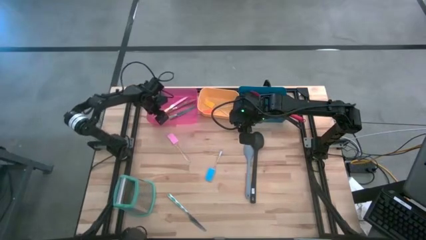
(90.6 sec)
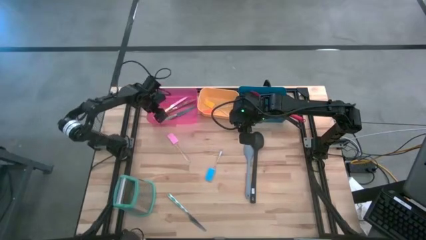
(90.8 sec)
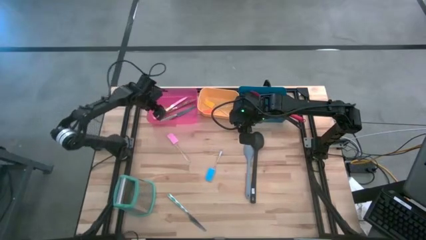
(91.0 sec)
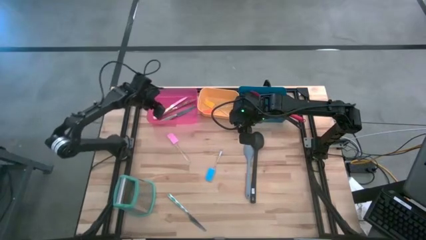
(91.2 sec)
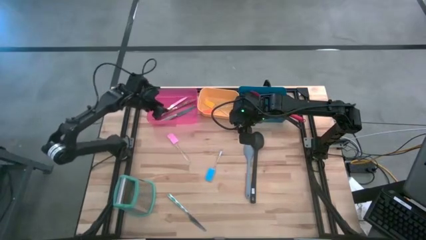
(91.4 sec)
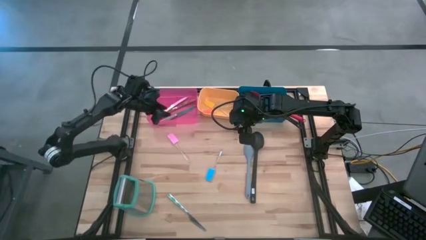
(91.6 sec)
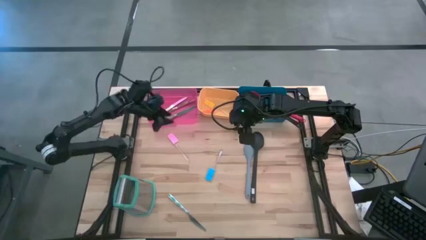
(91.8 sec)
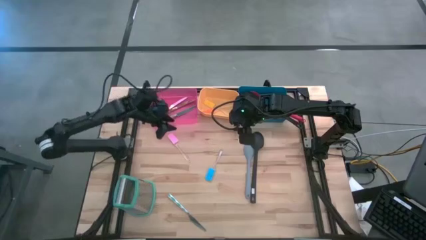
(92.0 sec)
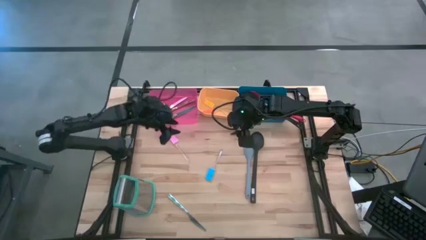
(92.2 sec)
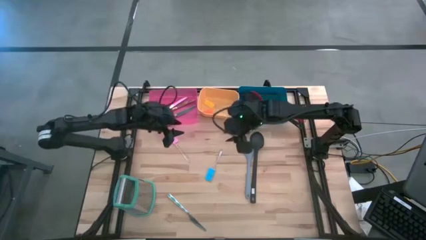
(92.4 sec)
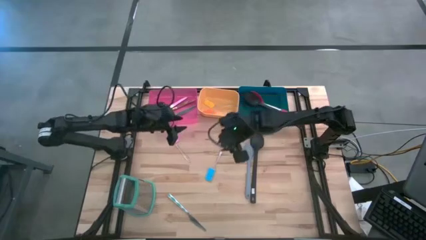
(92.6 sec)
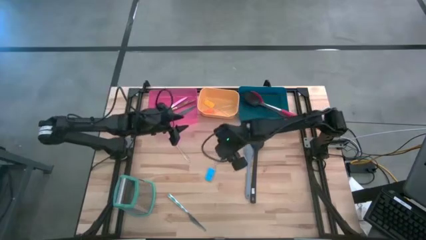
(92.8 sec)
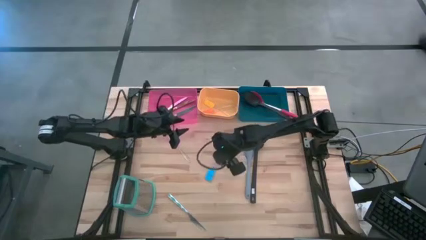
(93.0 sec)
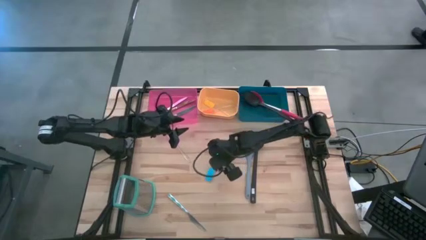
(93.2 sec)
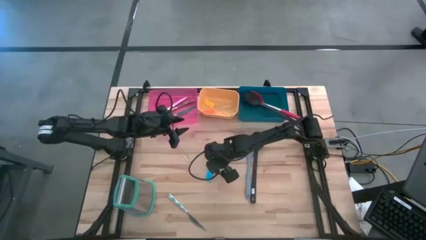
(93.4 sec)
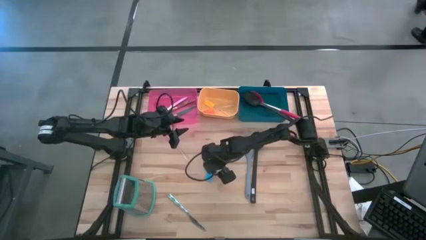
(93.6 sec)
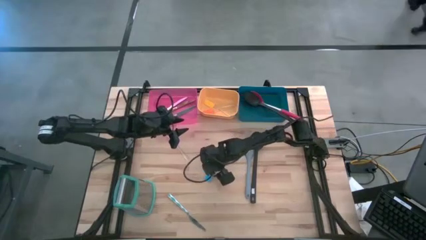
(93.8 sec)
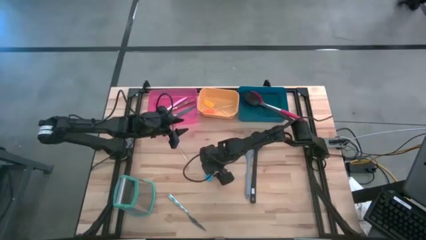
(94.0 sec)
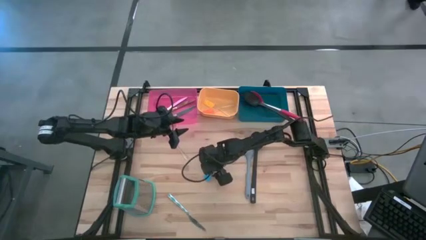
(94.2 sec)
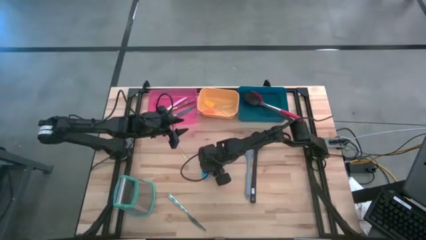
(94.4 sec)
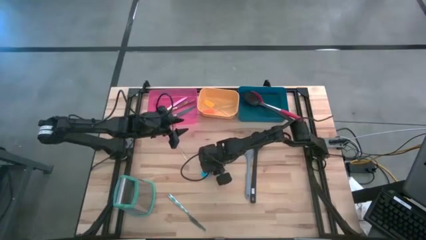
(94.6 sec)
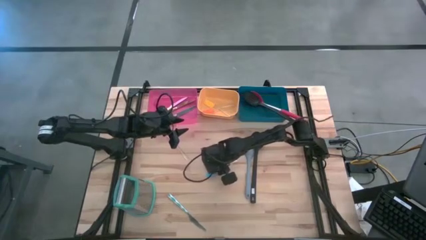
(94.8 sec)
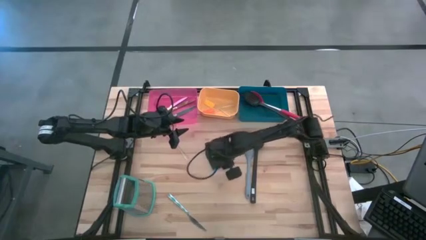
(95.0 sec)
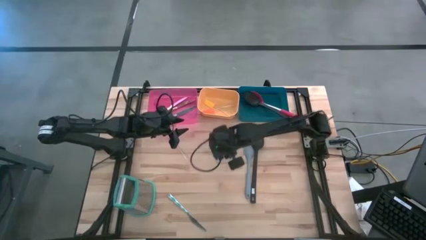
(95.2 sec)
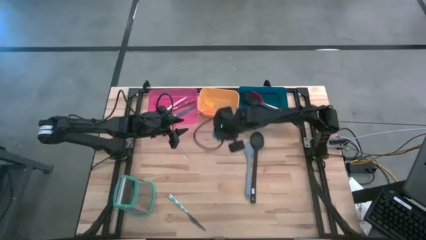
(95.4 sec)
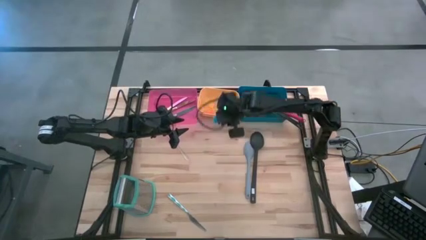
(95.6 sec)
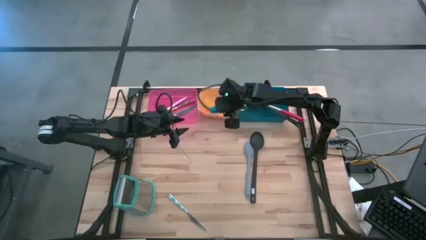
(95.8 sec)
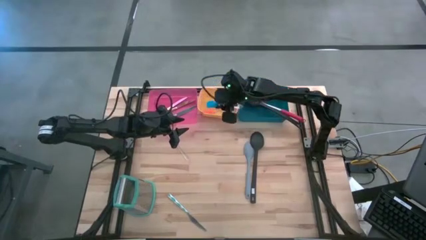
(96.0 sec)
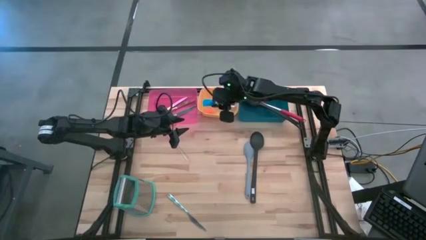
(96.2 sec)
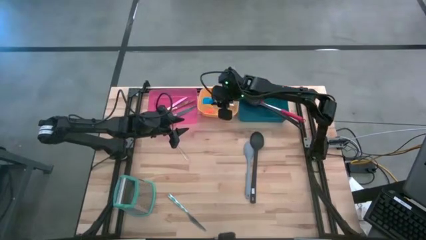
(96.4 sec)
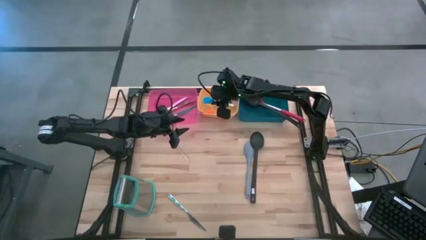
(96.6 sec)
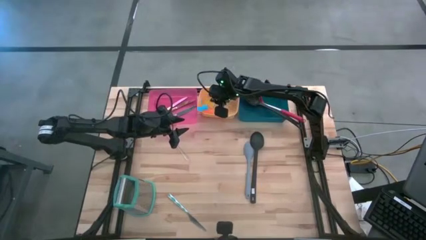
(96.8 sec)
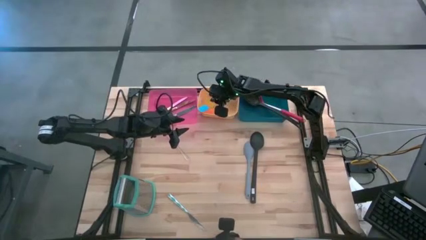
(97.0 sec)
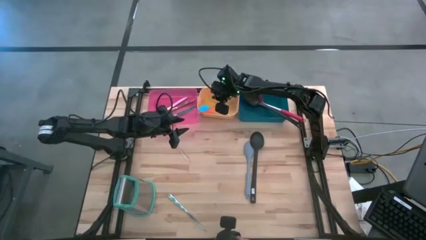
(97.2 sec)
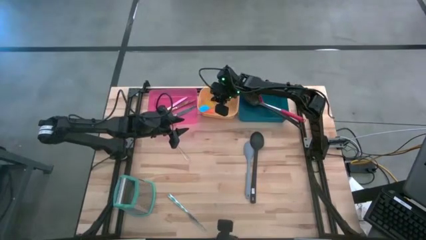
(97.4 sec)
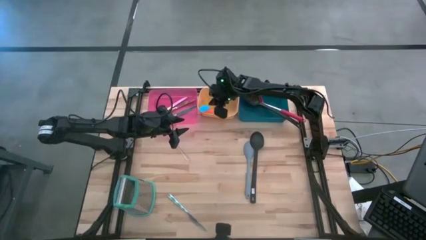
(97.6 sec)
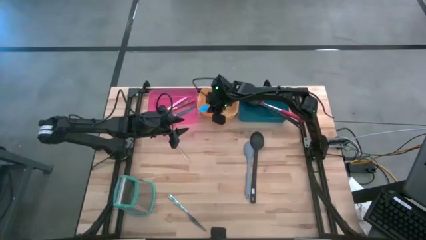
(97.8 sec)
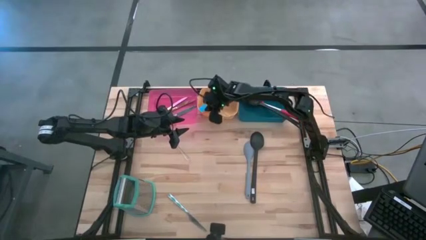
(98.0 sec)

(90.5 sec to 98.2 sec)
Task: Pick & Place Kitchen Items
Put the blue spatula into the yellow bin

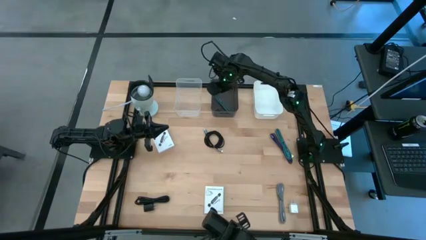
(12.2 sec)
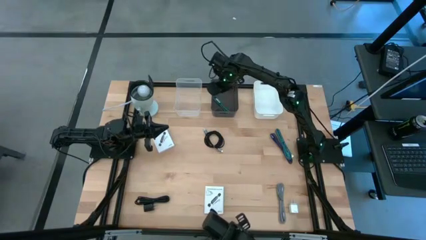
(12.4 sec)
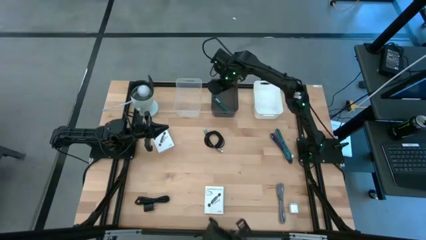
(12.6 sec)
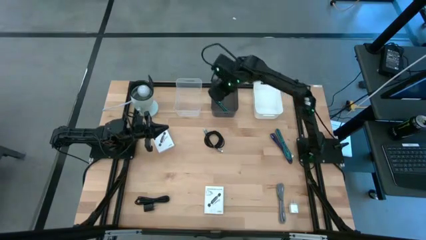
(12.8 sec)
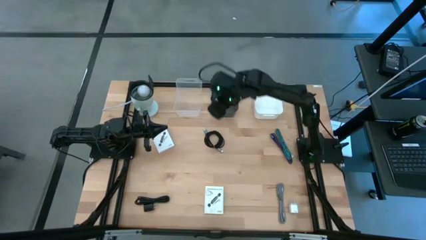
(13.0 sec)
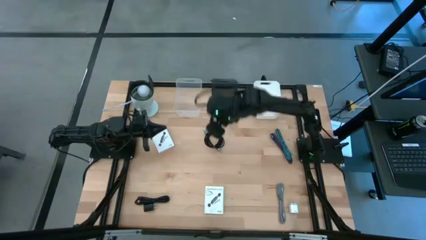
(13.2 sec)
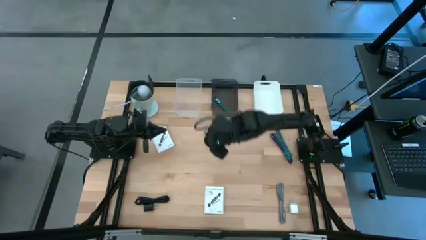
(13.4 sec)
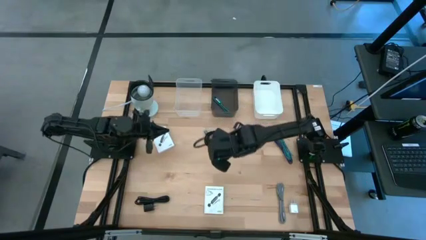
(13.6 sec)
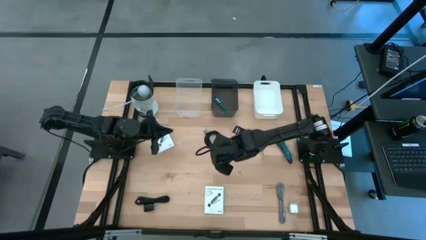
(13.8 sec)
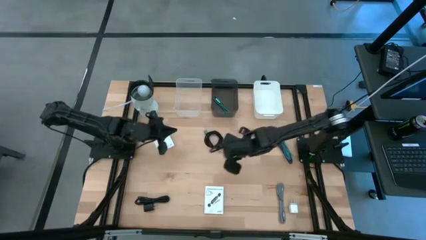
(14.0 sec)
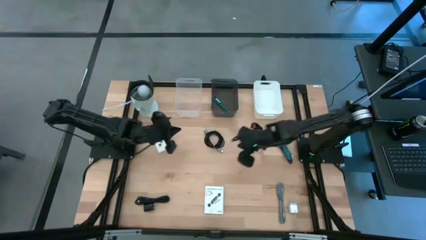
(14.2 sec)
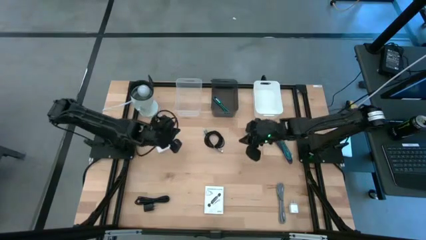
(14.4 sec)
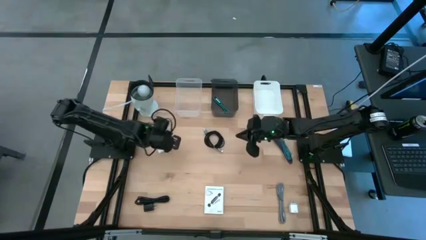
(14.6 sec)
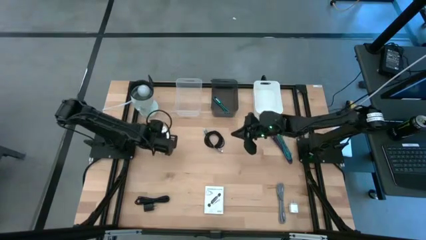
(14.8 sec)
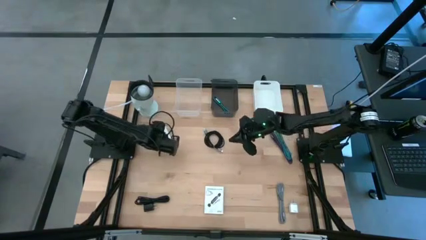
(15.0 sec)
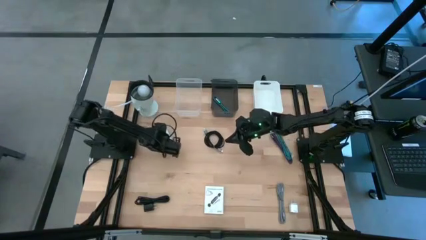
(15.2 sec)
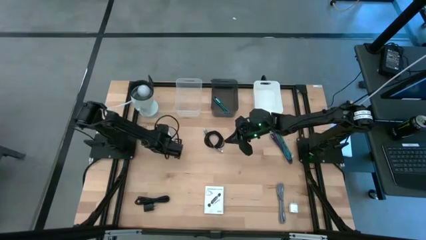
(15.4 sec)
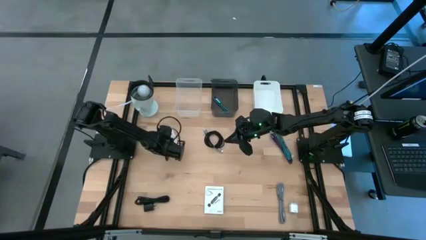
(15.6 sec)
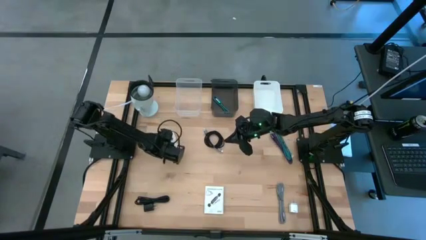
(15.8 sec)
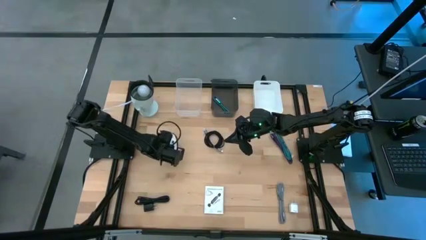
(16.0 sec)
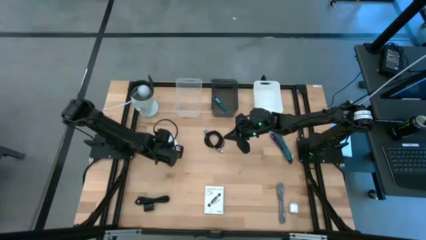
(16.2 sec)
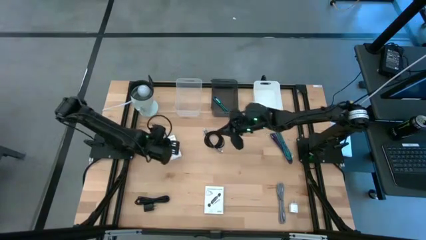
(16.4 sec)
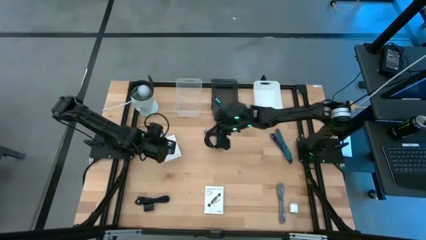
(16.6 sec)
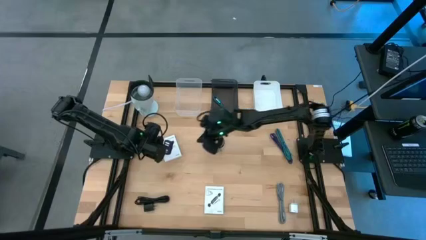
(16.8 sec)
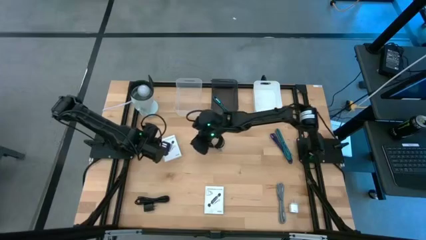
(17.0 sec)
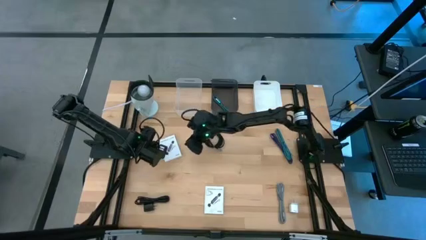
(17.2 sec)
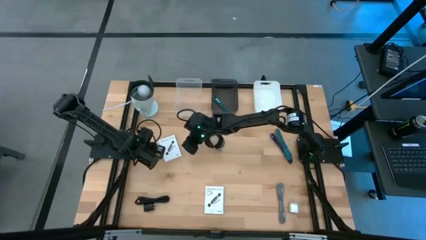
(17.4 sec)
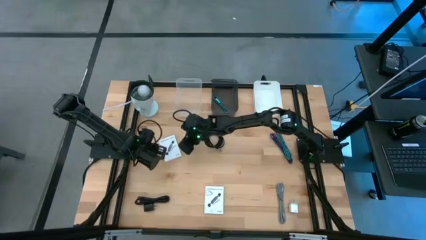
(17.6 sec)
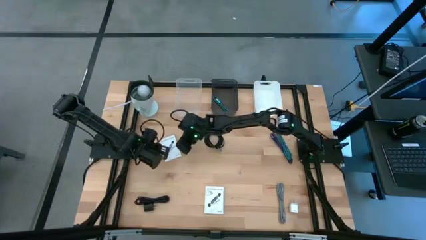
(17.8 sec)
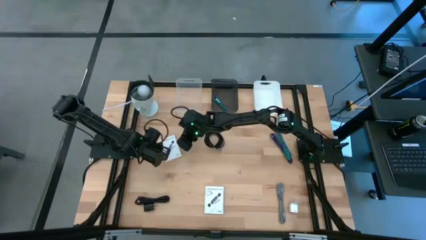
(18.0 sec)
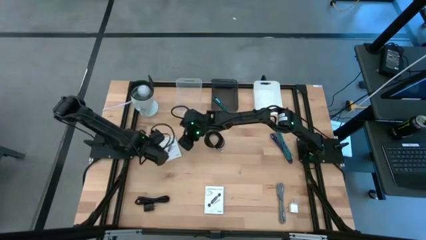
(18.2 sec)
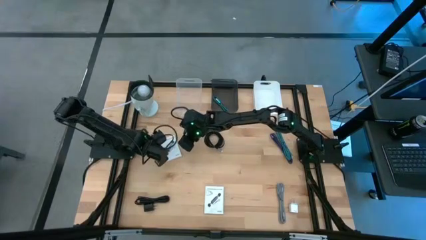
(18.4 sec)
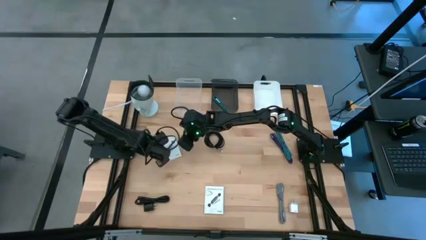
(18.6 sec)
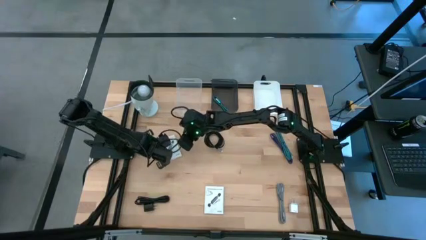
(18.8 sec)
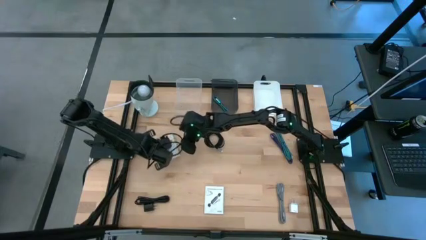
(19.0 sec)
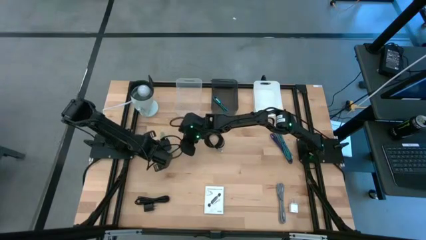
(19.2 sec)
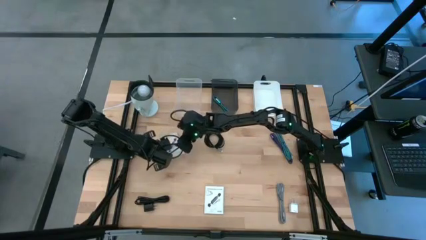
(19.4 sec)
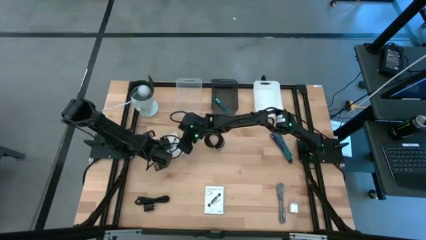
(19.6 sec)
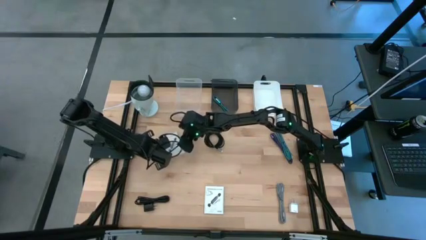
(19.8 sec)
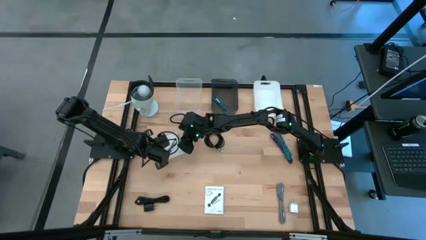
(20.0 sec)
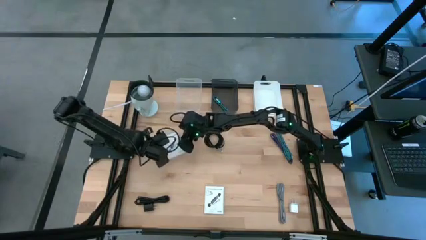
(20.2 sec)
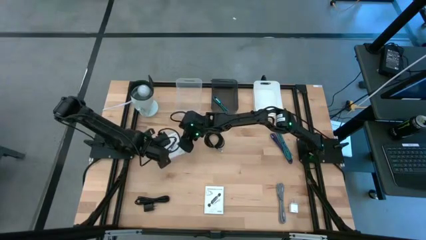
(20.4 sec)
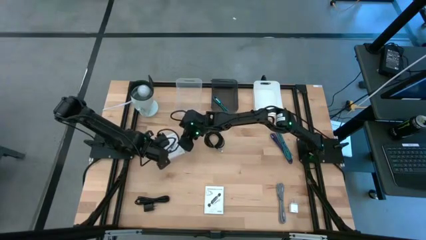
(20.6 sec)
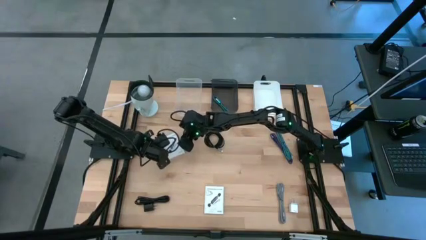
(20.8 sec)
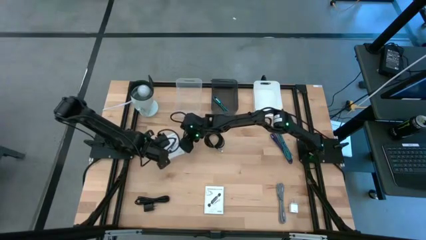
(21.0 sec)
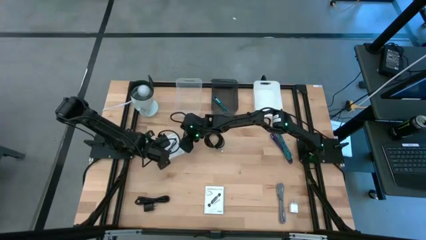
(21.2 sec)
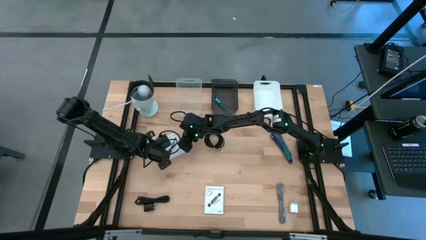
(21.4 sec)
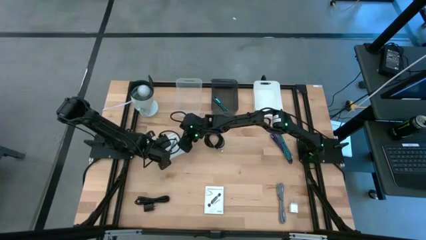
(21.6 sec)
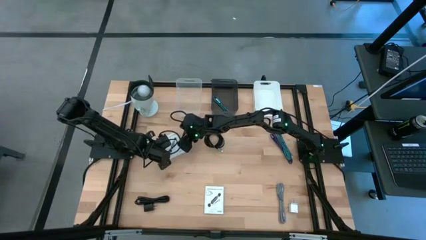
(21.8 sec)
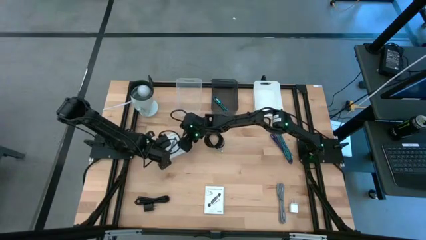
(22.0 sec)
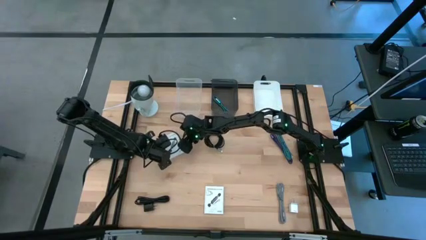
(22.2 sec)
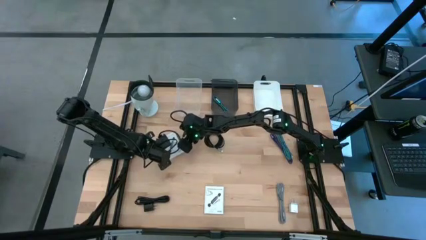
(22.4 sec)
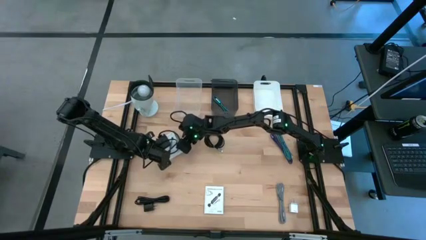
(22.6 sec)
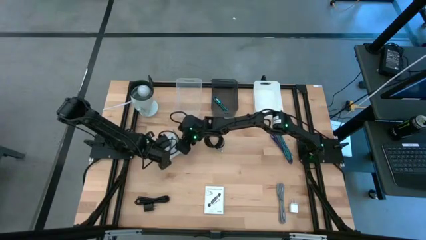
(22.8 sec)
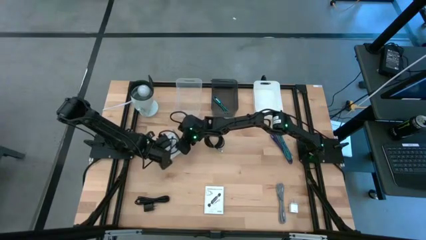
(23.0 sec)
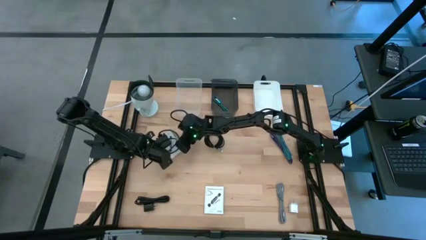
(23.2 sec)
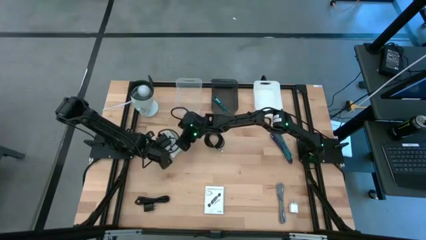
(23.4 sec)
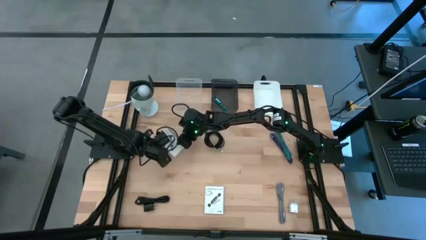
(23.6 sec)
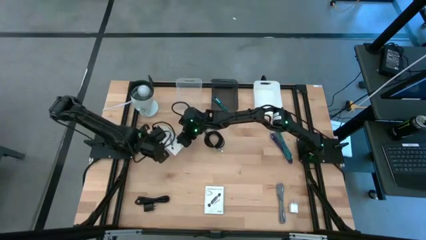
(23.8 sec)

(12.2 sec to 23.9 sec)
Task: Pick and place items into bin
Put the top card reader box into the transparent bin
